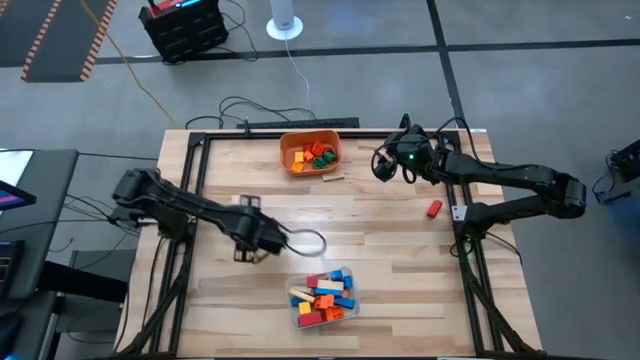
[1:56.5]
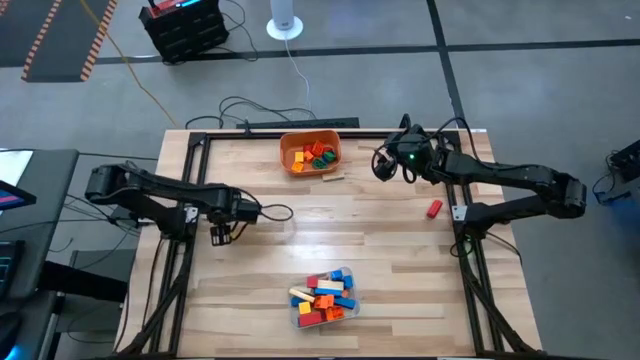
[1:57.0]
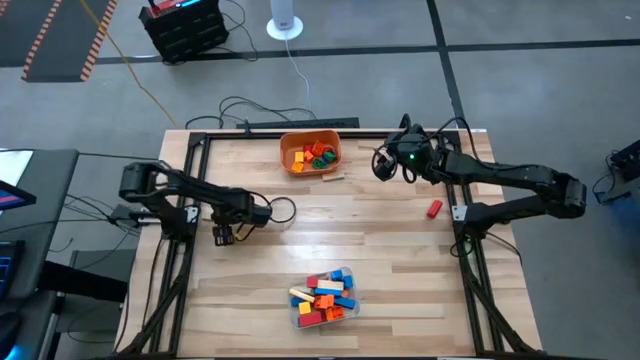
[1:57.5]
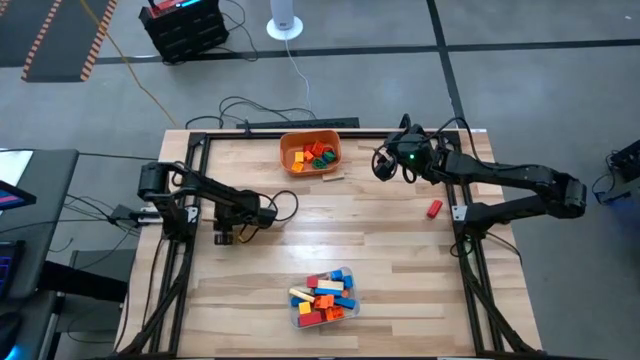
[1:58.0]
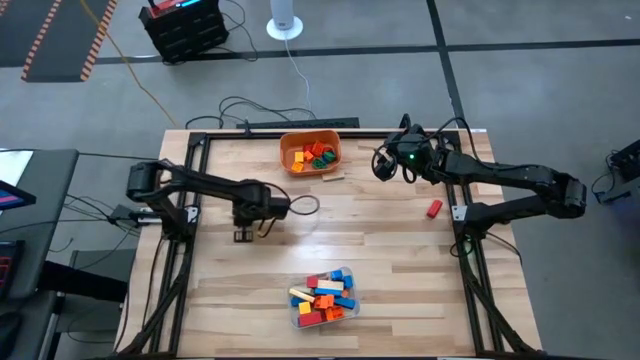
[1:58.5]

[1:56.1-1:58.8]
Task: Sort blocks by size
Put the large brown wooden block into the transparent bin

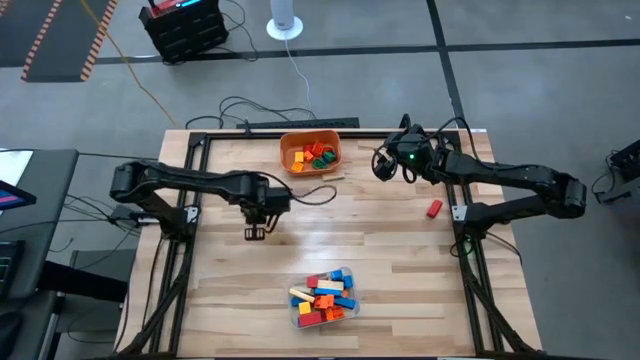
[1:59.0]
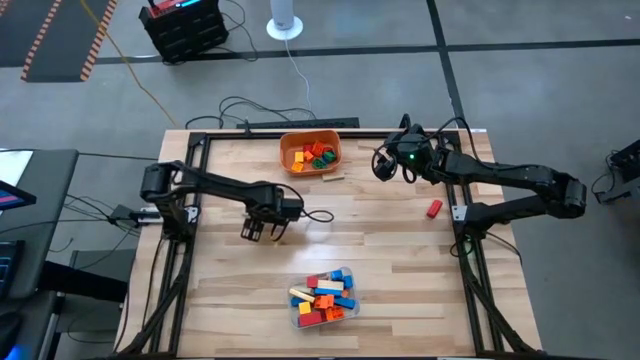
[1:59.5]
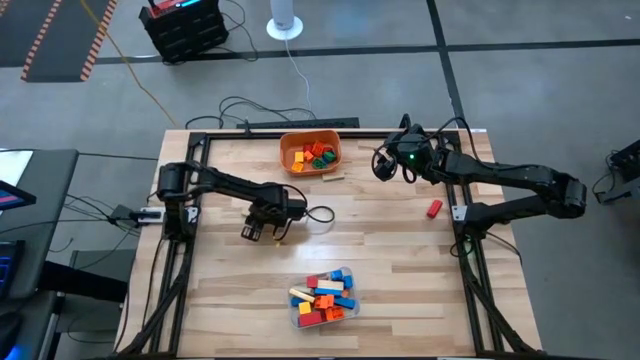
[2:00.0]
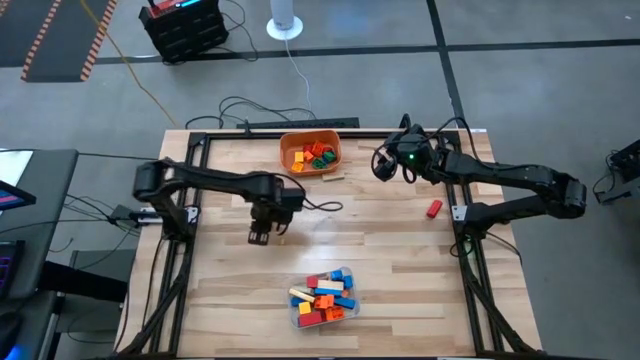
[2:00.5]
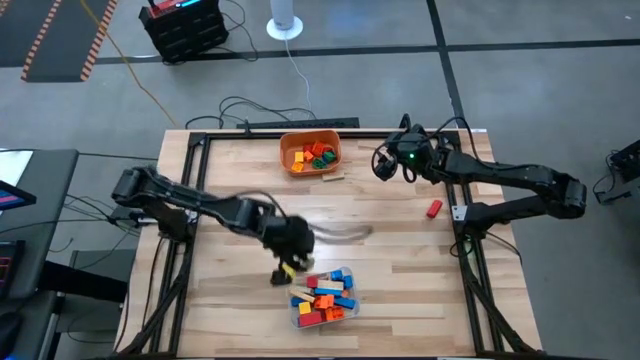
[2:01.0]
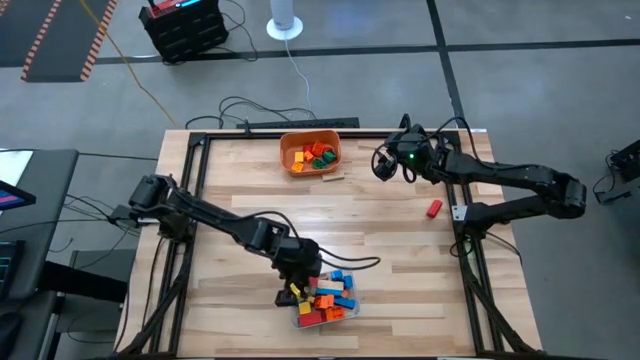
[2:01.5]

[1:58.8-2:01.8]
Put the large brown wooden block into the transparent bin

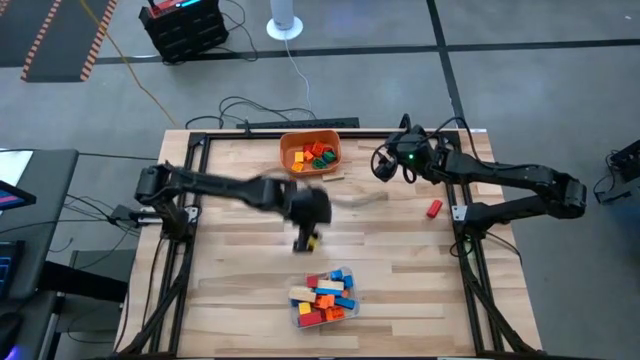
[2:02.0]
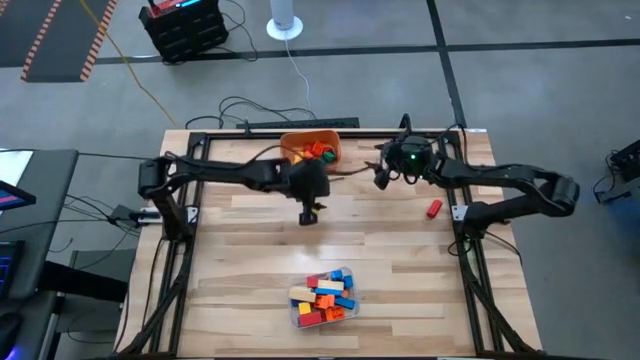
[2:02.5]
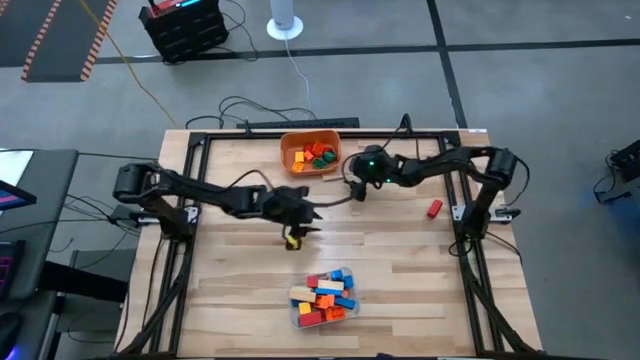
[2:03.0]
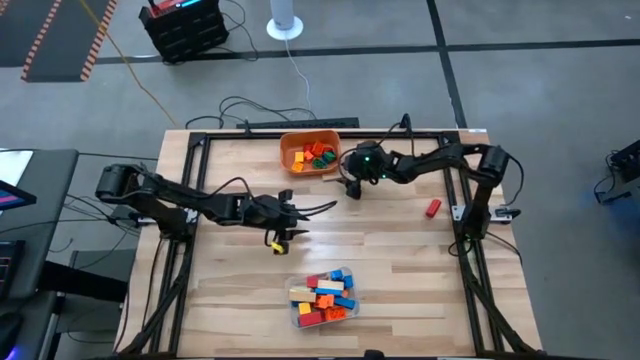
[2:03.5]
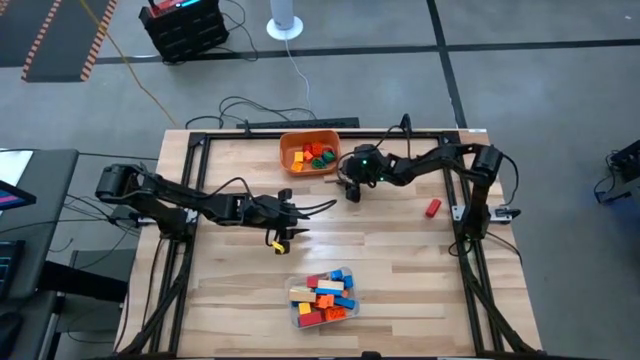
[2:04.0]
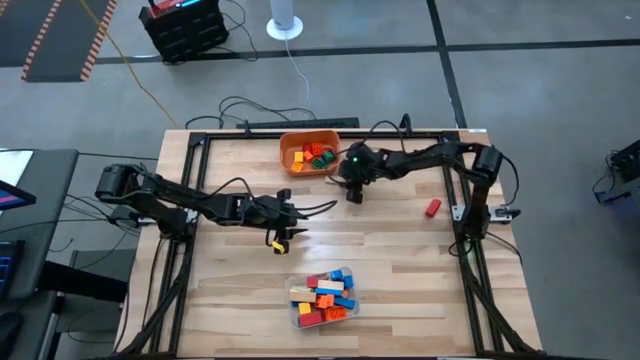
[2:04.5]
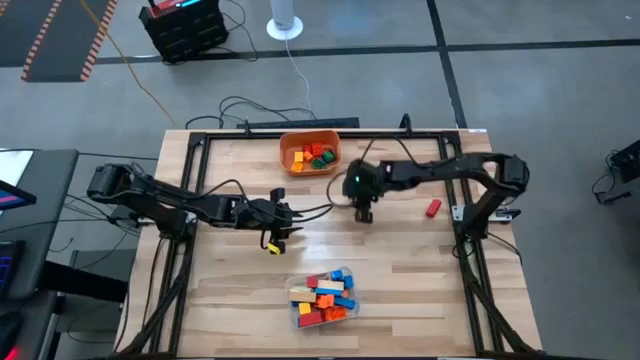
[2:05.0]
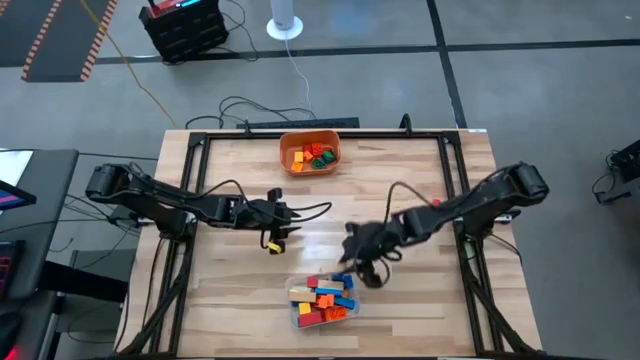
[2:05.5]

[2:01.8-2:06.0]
Put the large brown wooden block into the transparent bin

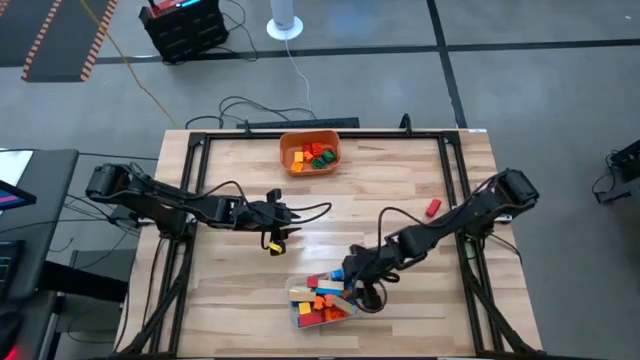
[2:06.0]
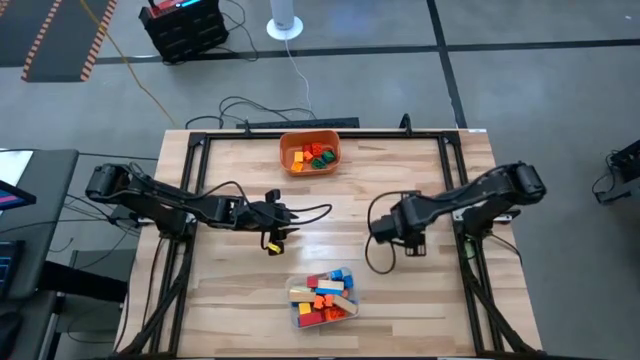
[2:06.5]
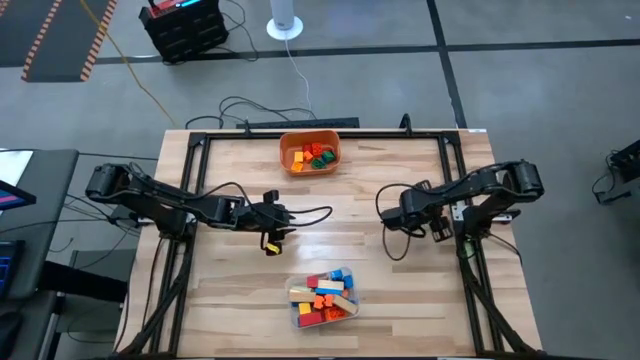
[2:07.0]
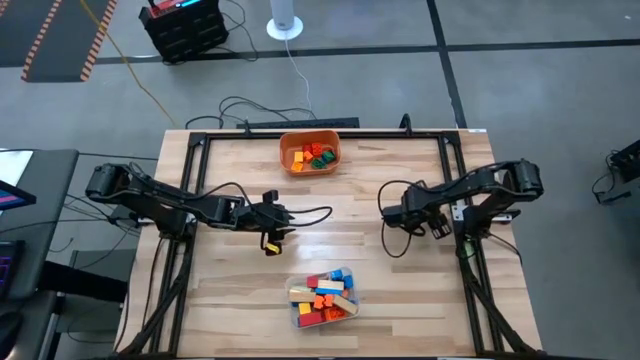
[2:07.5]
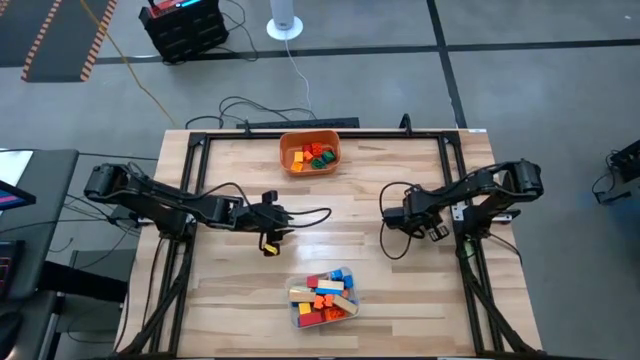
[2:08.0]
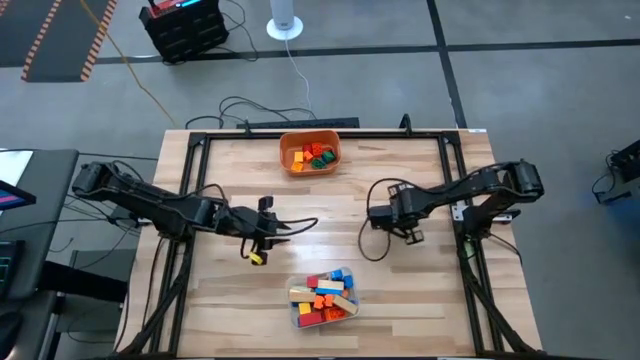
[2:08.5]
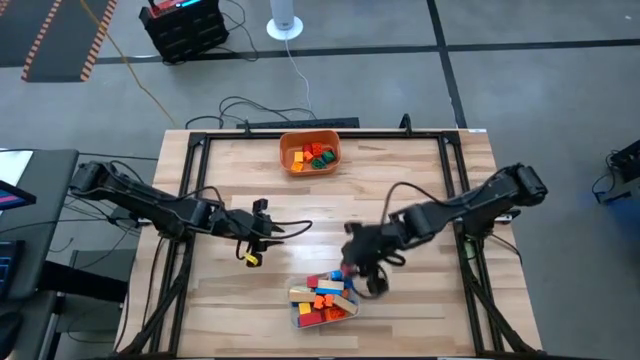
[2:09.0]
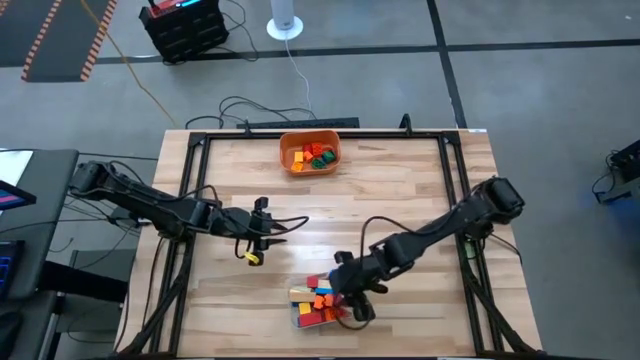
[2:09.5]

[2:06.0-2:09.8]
Put the large red wooden block into the transparent bin

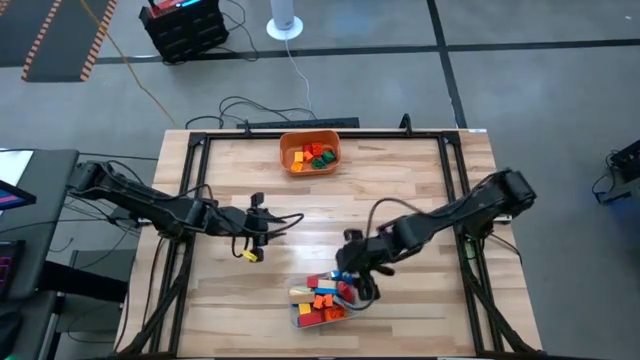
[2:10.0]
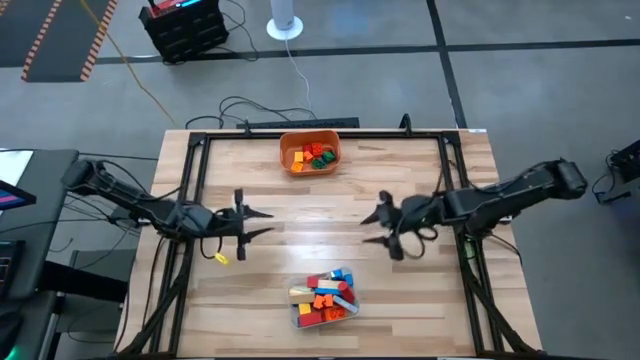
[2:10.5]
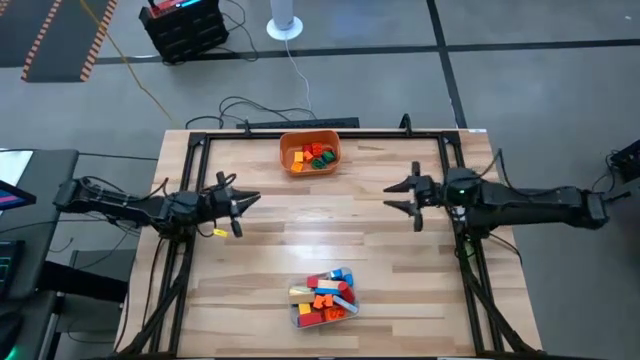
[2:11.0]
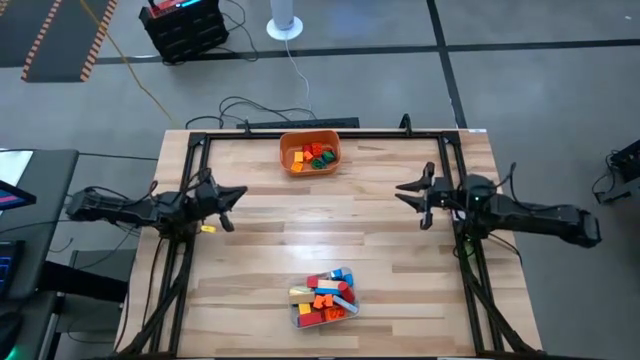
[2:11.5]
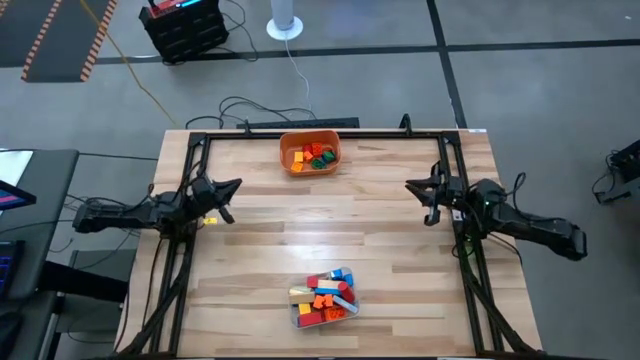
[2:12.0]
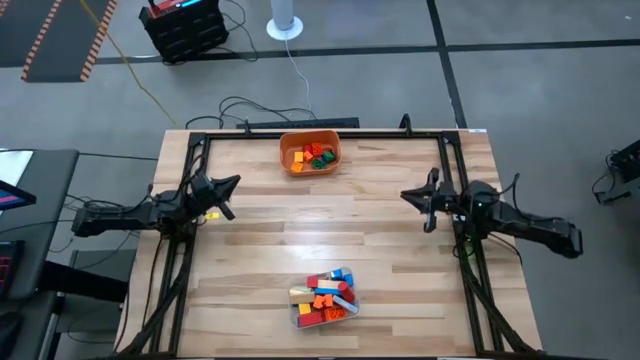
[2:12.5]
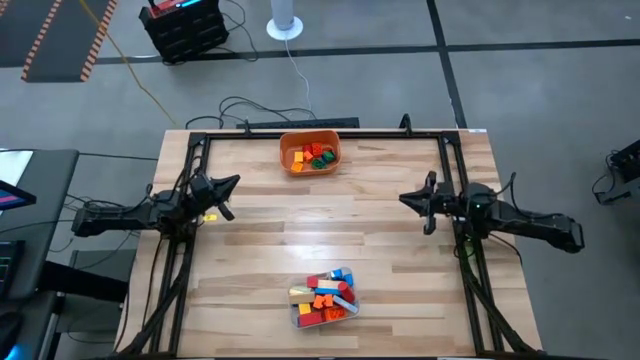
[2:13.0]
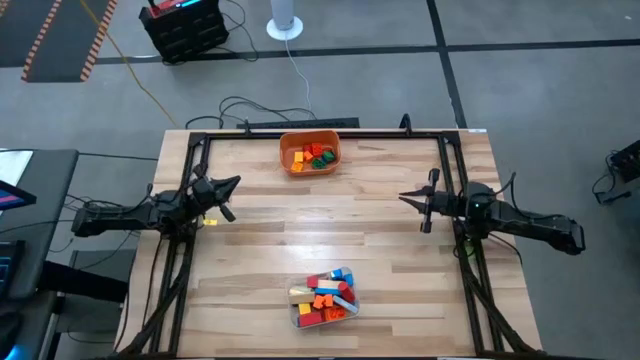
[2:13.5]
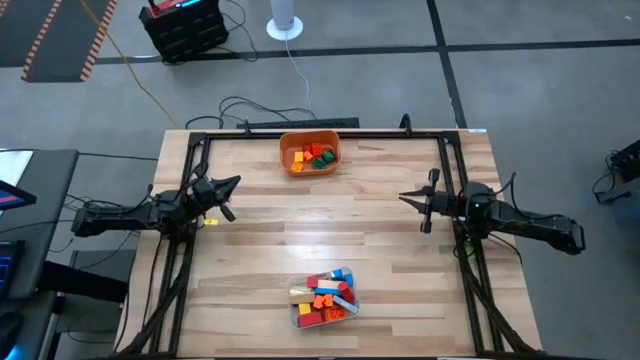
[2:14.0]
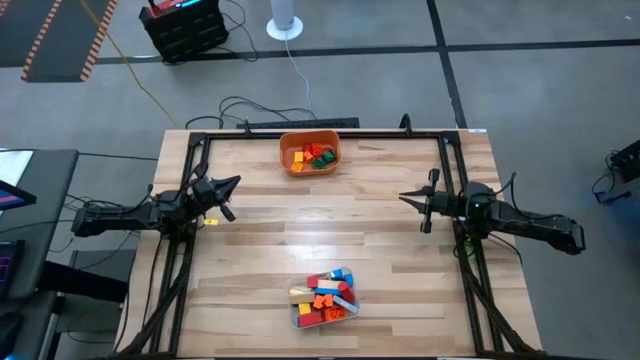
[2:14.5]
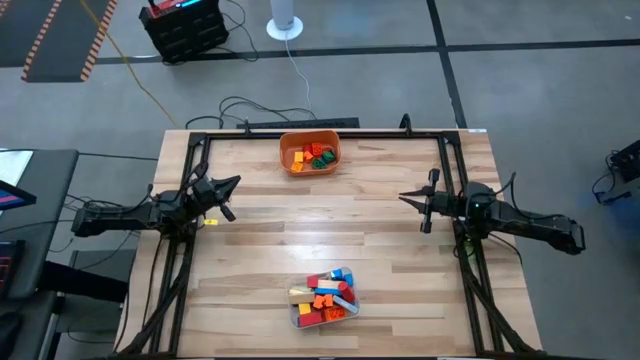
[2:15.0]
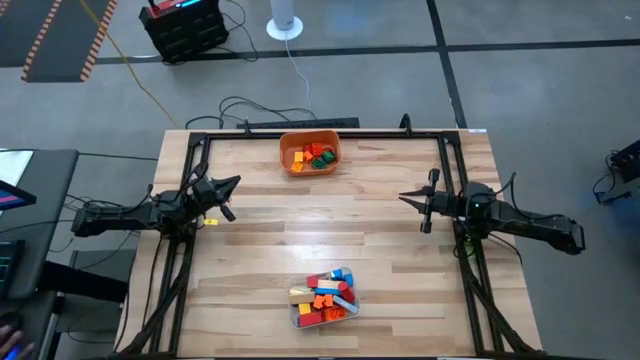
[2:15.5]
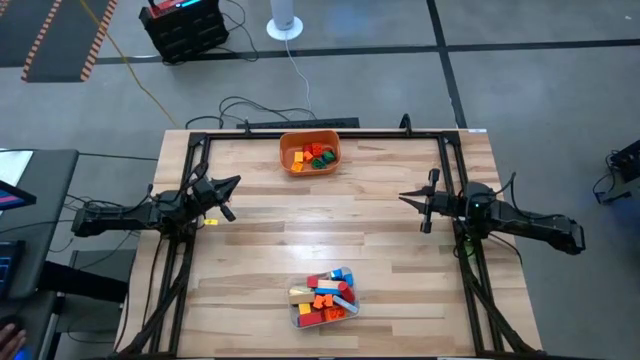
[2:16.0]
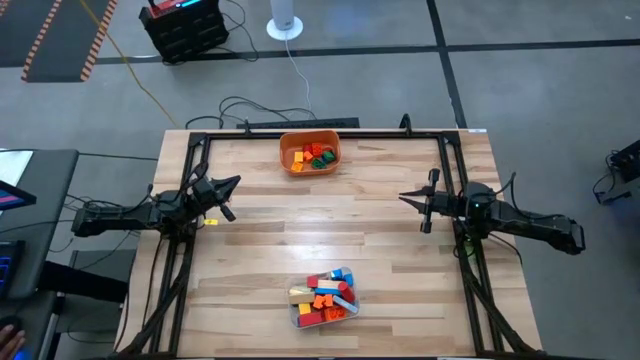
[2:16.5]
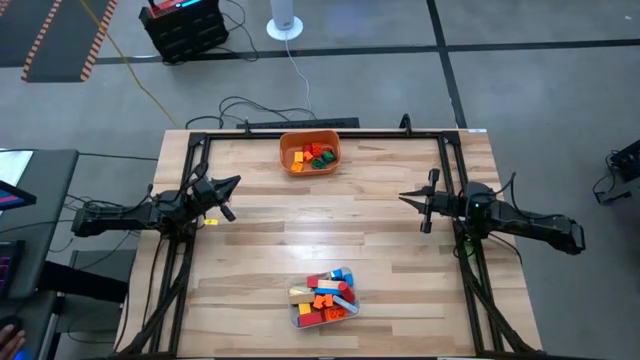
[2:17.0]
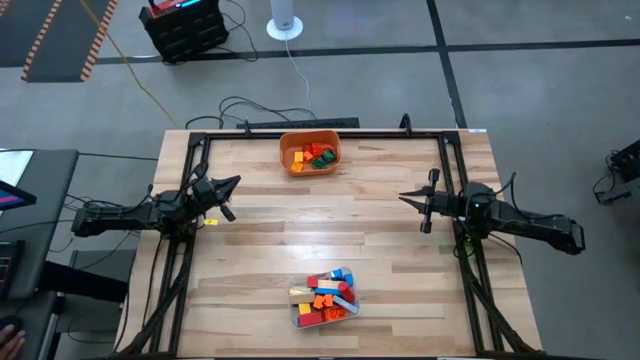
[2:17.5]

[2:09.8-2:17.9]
Return to Home Position
